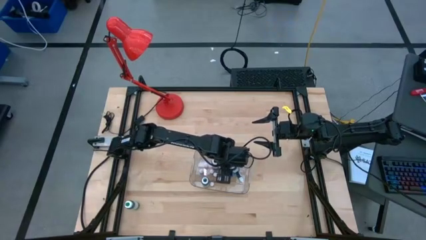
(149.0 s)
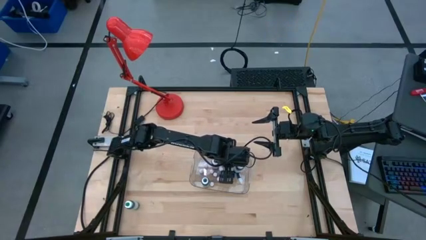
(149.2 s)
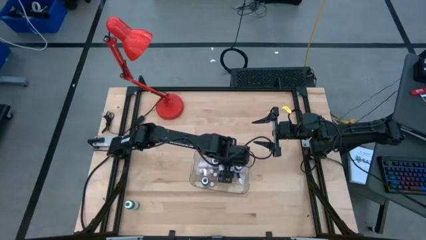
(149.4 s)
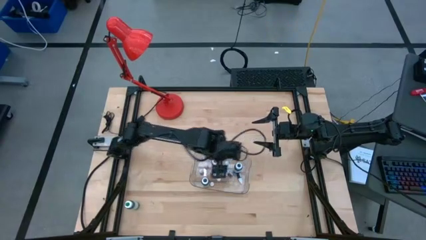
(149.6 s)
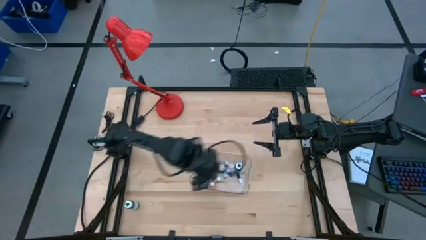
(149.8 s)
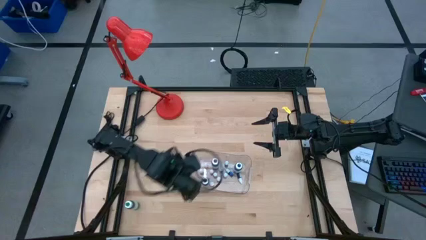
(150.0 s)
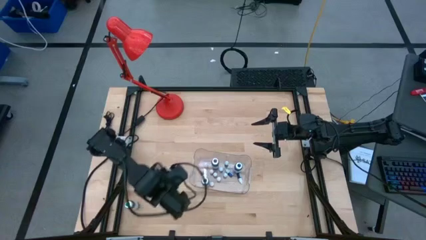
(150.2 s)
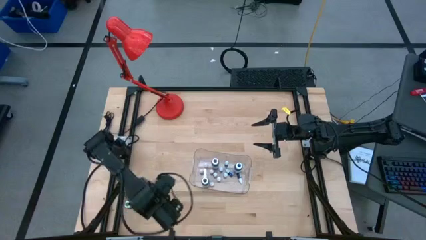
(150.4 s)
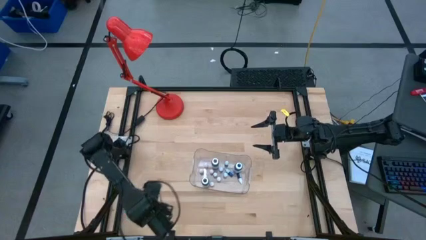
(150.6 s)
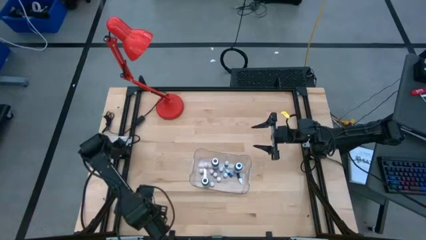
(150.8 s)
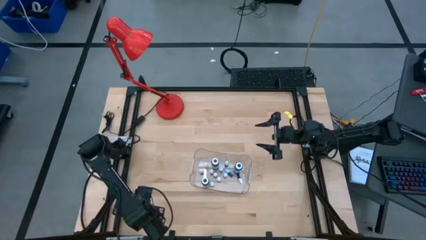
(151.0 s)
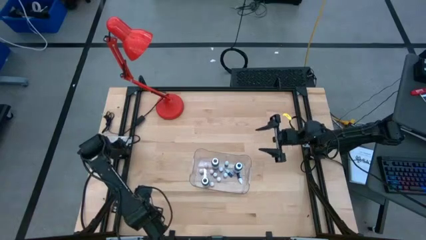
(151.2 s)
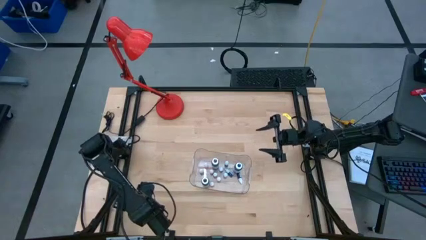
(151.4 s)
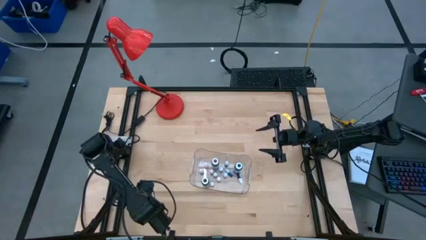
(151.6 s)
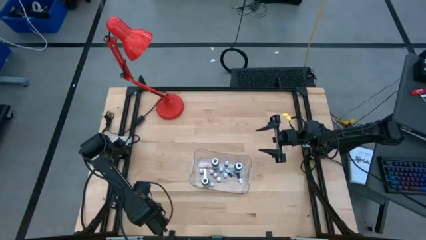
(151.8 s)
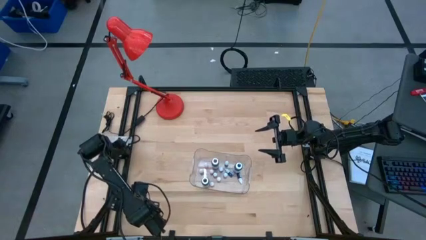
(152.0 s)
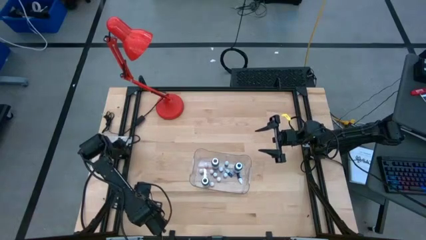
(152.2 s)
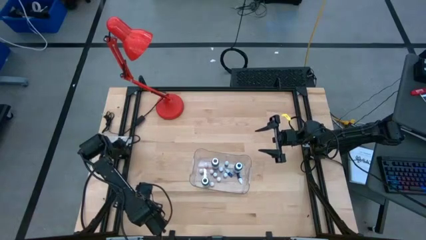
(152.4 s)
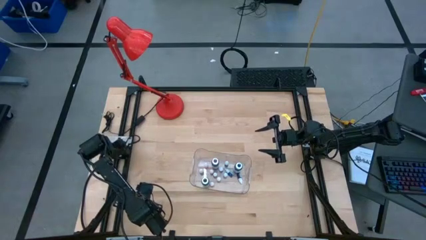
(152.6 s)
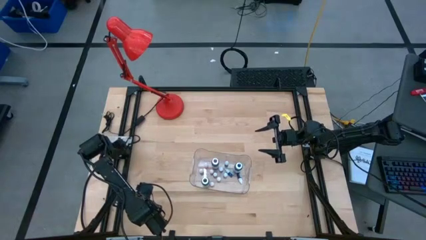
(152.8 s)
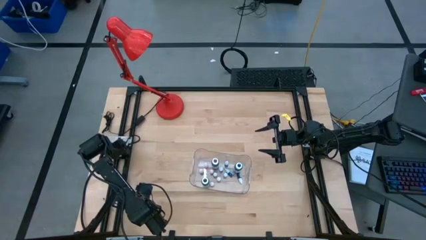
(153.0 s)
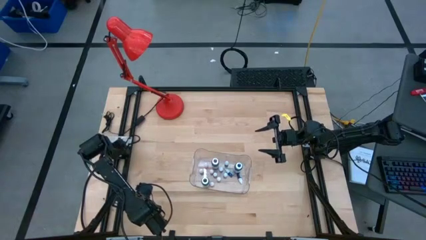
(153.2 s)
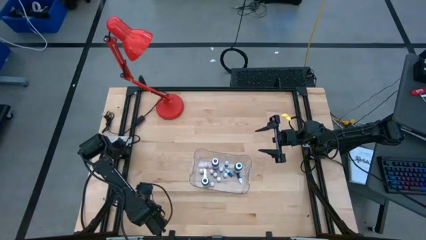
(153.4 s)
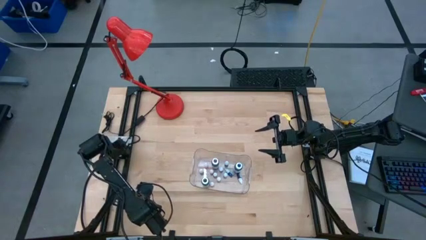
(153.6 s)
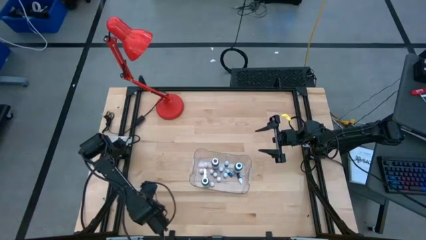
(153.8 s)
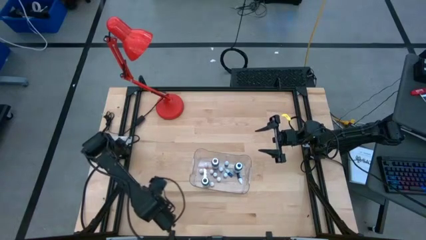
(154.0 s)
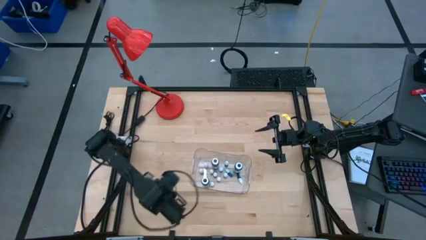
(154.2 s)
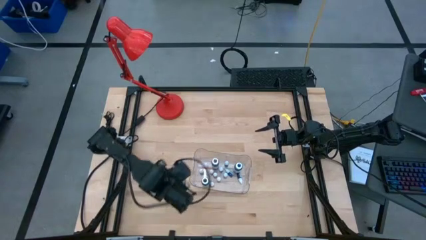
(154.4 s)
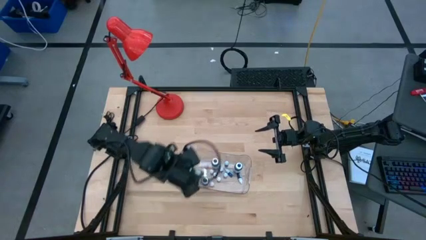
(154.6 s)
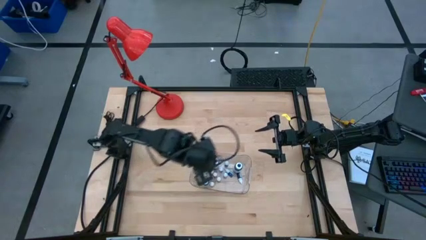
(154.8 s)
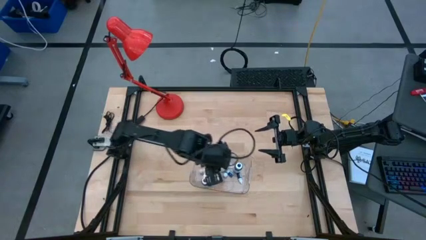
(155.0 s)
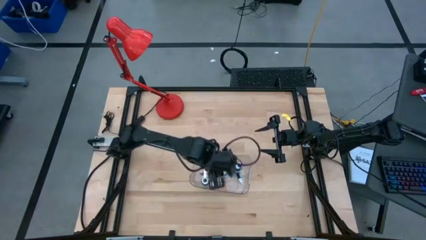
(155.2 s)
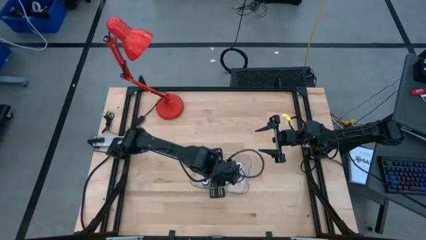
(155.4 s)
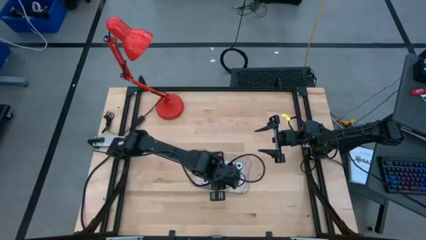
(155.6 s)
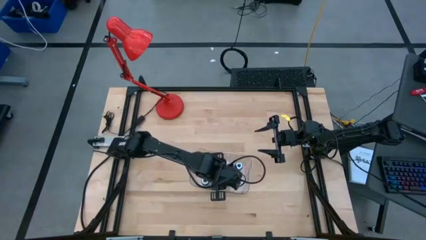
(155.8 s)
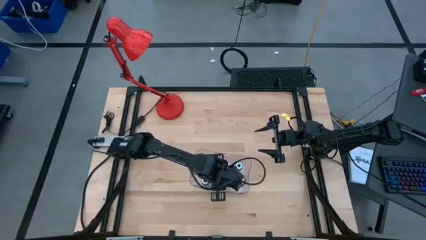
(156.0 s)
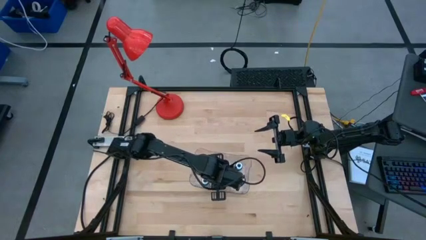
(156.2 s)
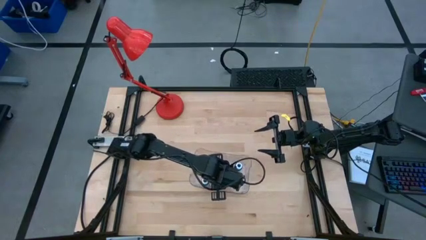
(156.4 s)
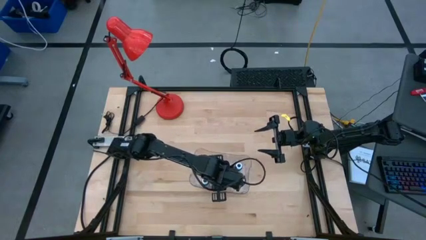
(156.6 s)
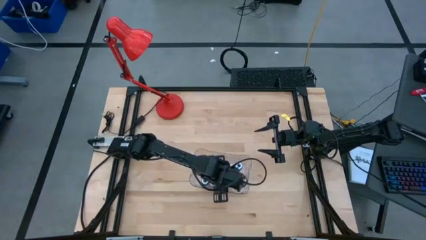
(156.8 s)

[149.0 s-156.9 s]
Task: Pick & Place food coloring
Put the large green food coloring bottle into the transparent bin

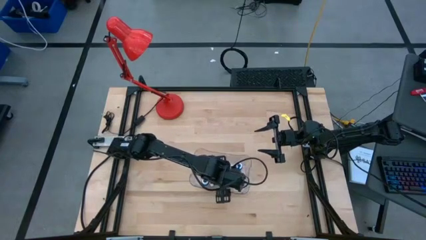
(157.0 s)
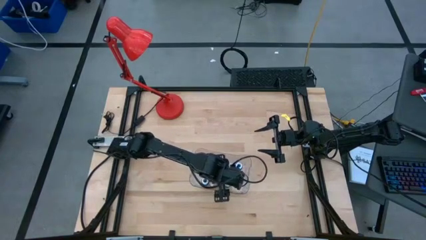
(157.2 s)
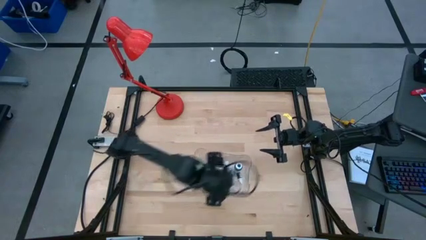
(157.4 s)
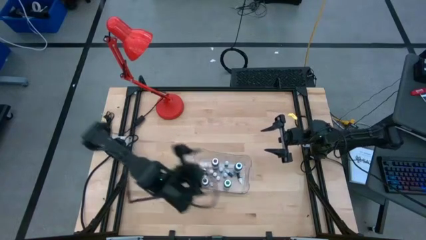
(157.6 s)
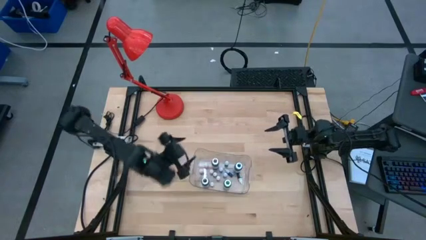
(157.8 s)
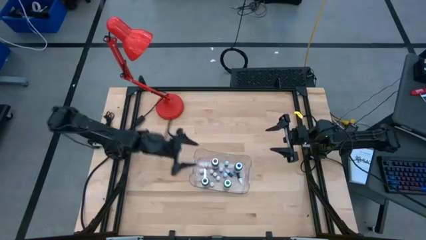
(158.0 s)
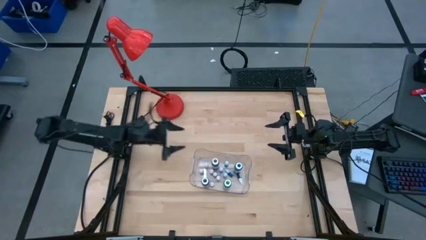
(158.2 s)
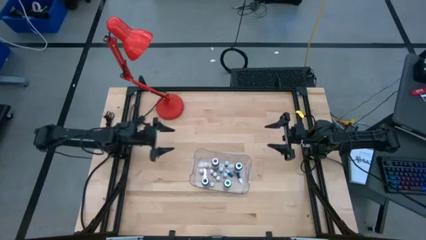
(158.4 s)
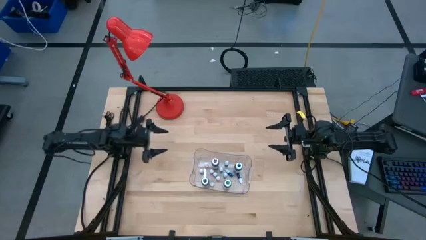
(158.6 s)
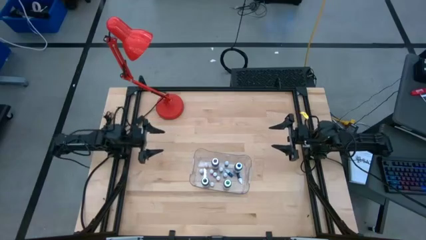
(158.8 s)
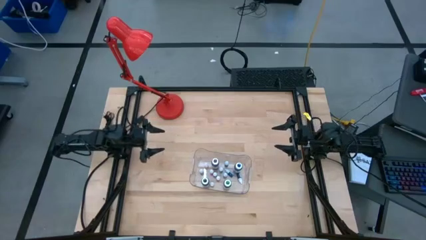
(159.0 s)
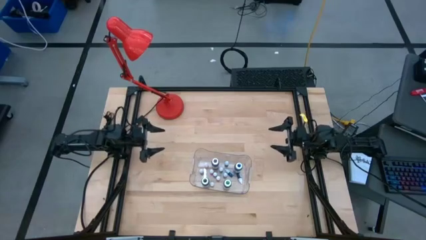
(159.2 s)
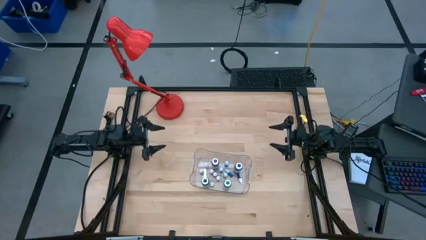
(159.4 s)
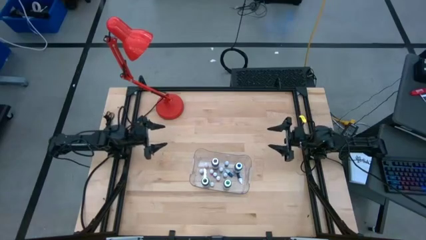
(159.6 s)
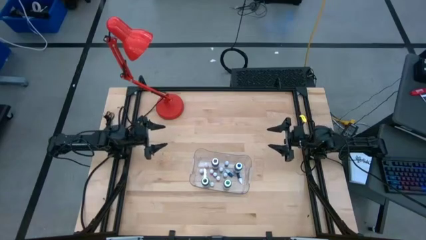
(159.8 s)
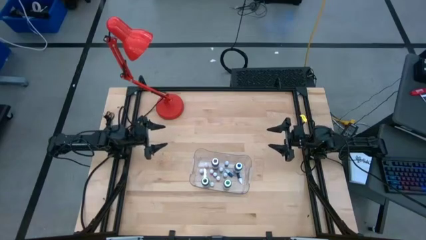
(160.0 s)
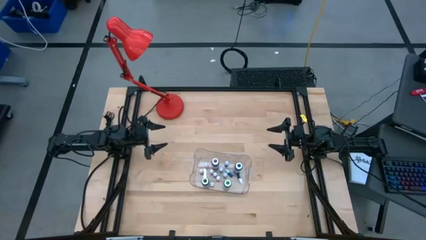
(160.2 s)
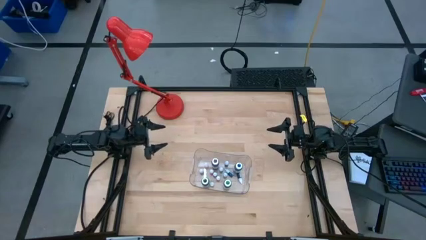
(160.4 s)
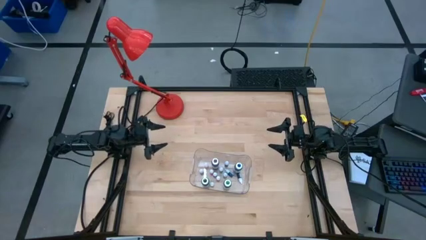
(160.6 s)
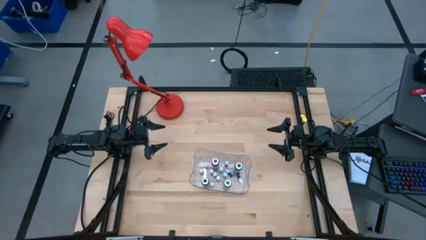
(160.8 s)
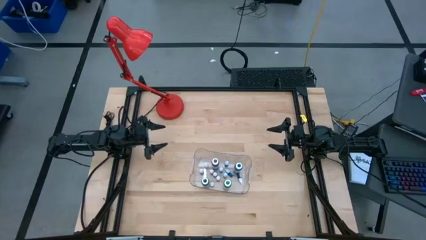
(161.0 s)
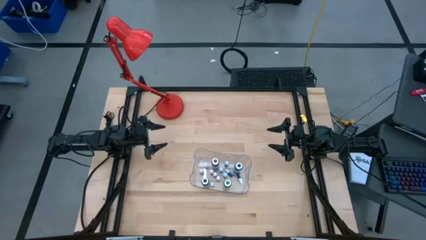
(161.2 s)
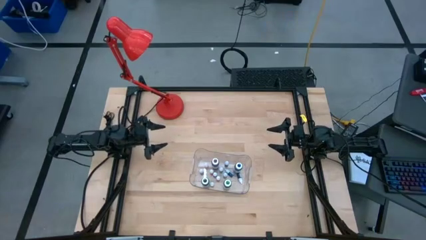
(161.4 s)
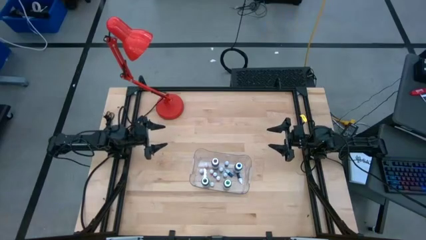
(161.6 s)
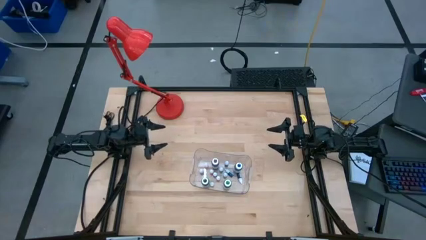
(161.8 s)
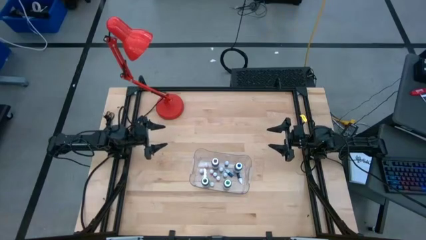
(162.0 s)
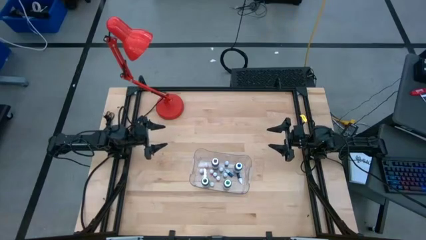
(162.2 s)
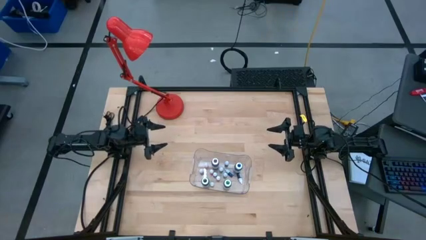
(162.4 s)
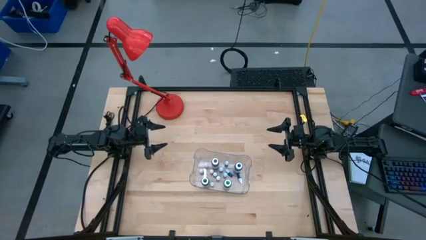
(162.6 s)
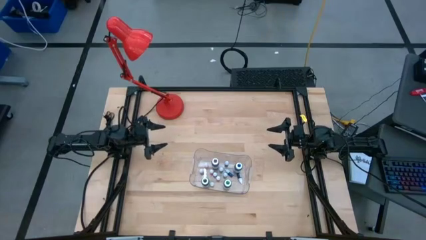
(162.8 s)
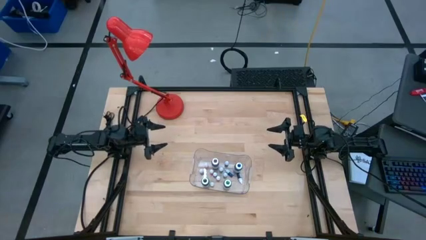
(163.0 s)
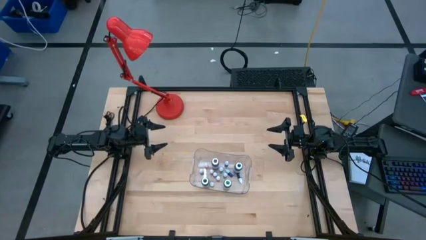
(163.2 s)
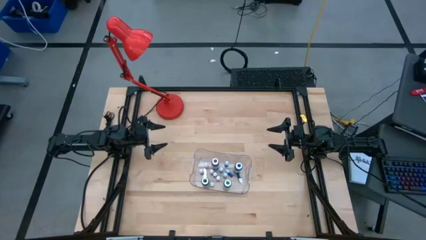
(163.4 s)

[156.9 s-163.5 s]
Return to Home Position

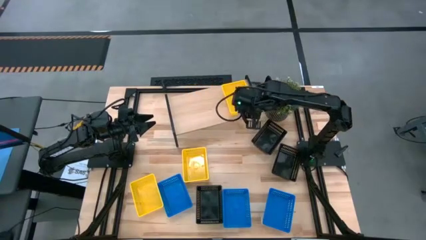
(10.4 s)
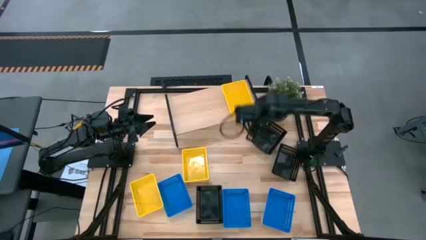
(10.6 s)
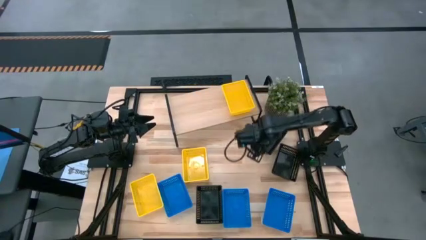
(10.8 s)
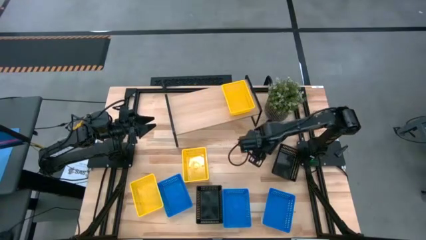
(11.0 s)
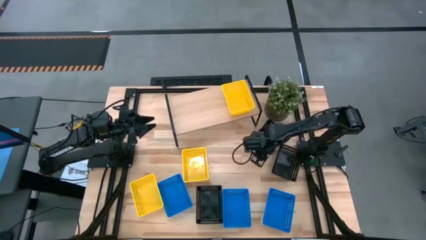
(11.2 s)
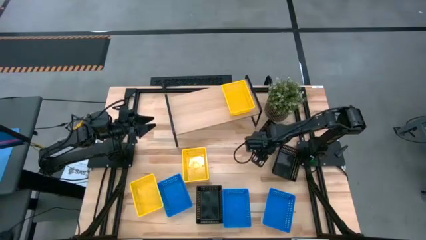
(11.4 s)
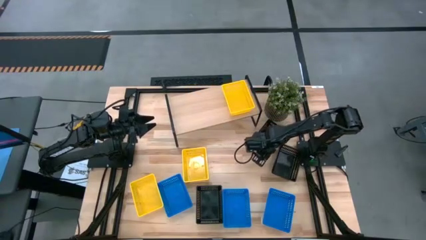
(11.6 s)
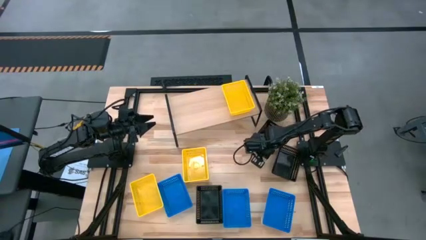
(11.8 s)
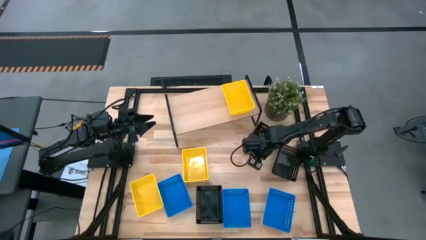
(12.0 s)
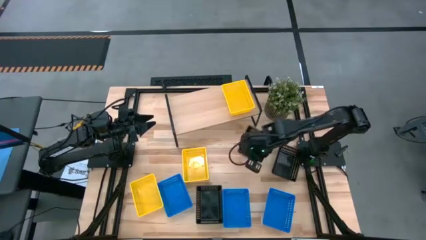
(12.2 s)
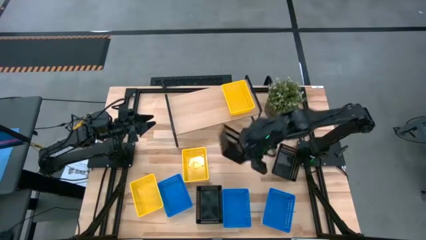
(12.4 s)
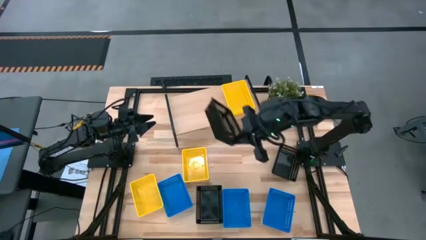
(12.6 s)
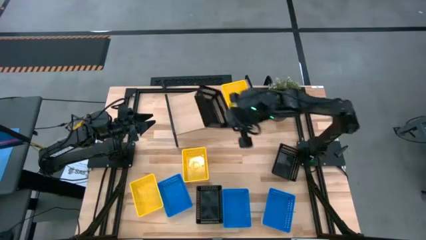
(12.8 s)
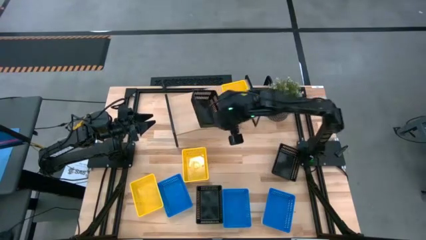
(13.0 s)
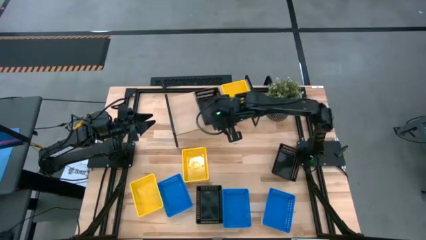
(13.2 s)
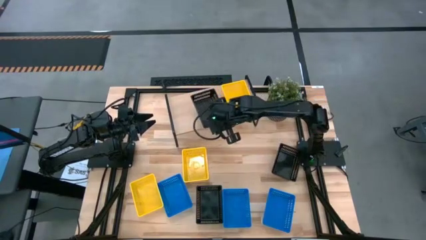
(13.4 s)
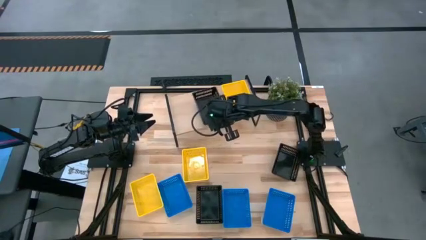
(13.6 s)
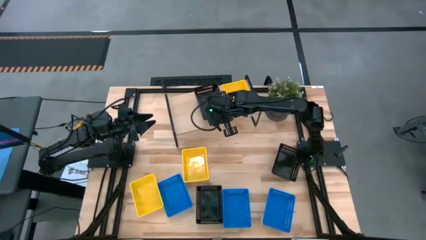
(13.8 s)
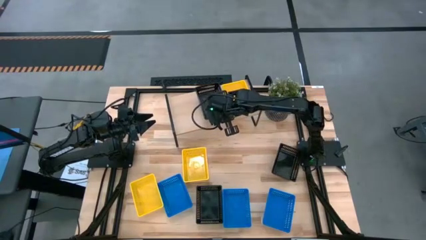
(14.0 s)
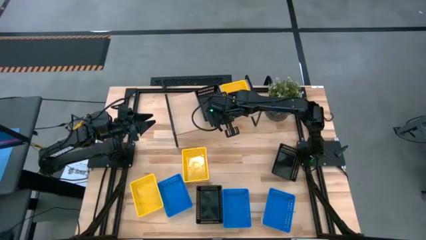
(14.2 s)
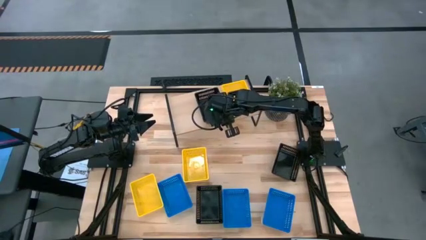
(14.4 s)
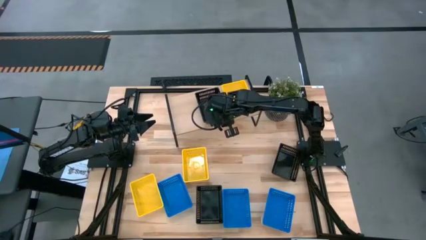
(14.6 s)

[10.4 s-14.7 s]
Task: Stack baskets on shelf by color
Put the top black bin on the shelf
